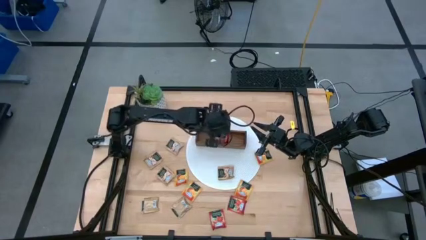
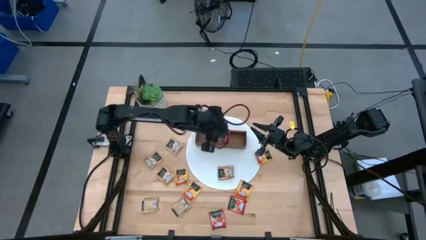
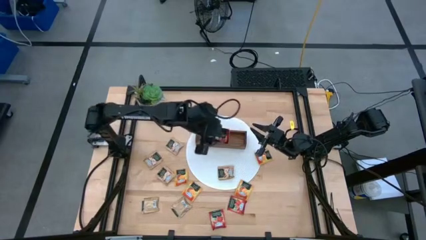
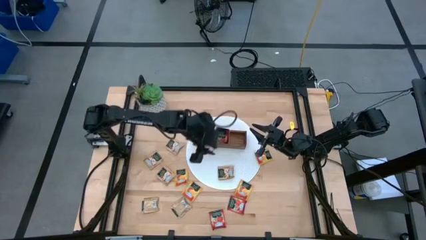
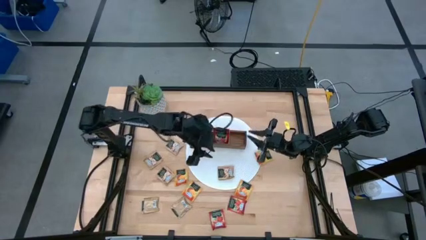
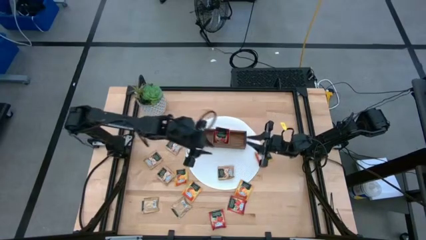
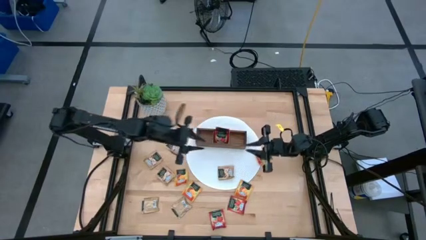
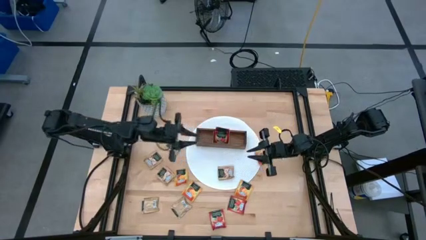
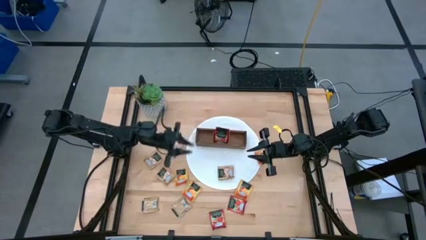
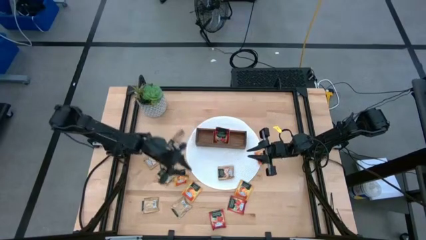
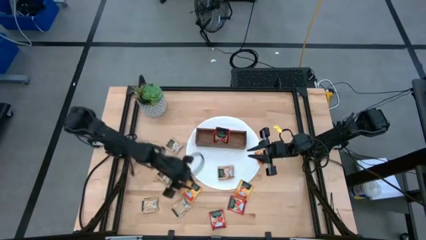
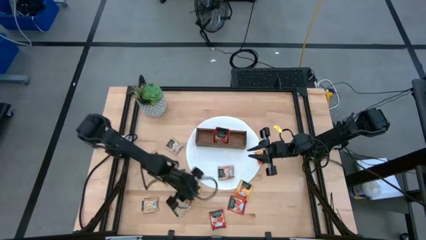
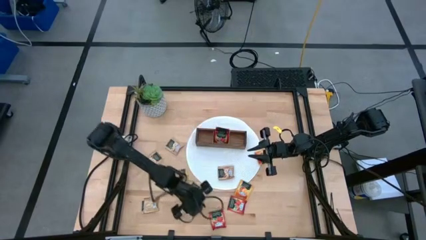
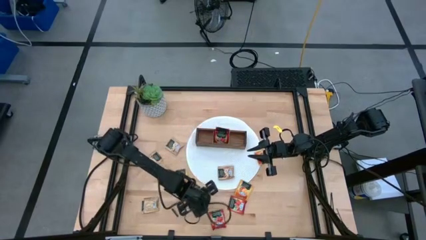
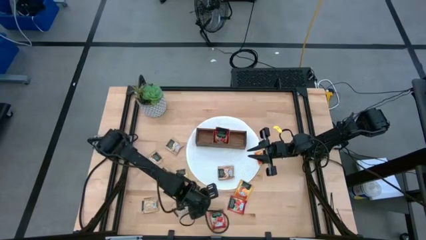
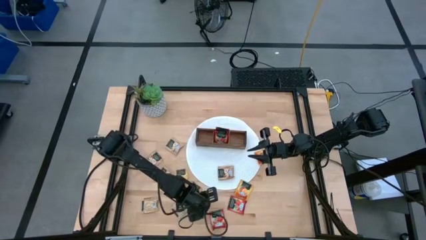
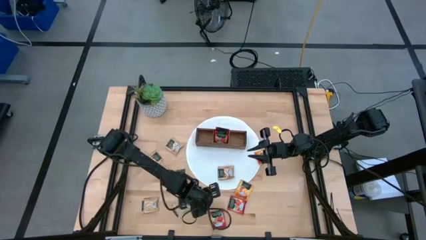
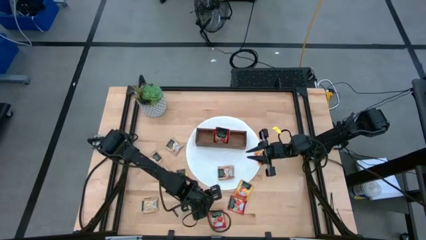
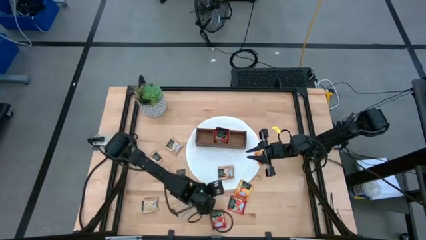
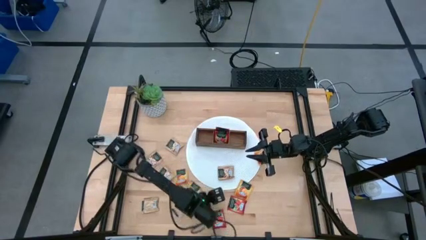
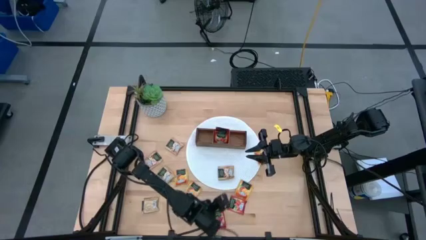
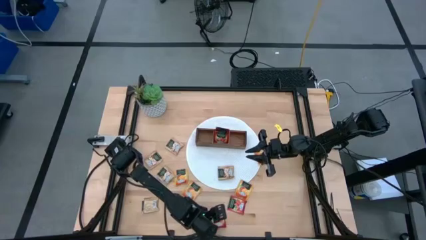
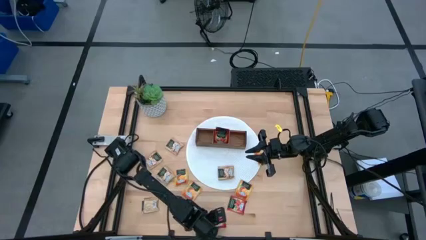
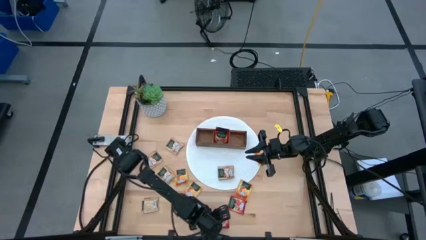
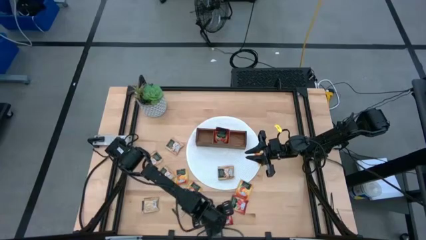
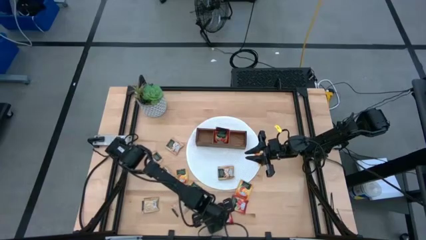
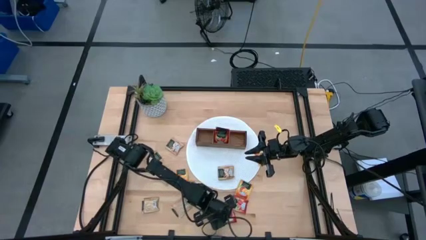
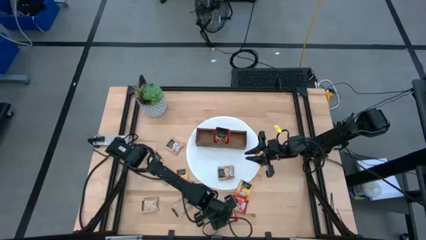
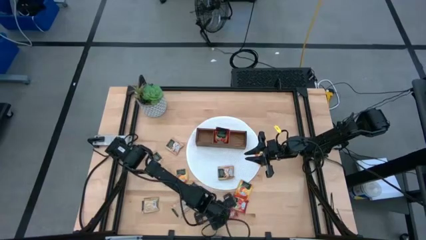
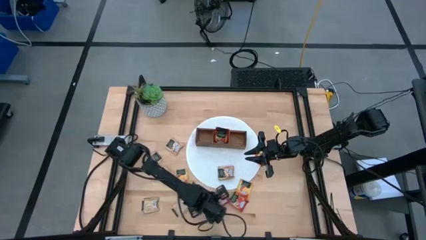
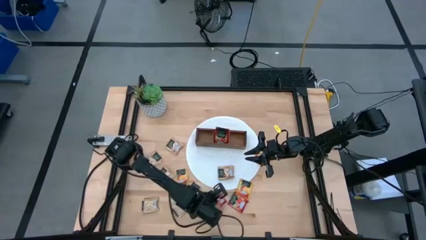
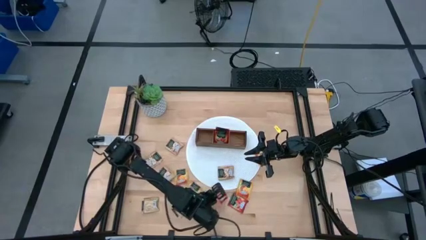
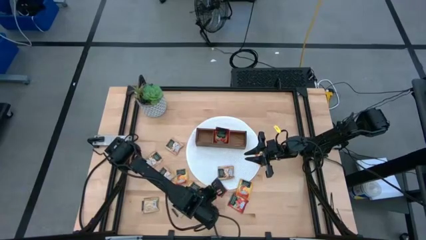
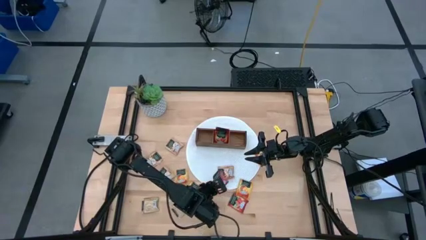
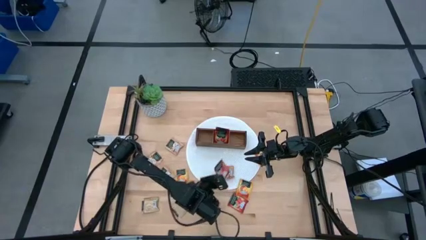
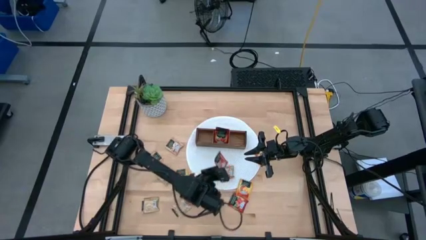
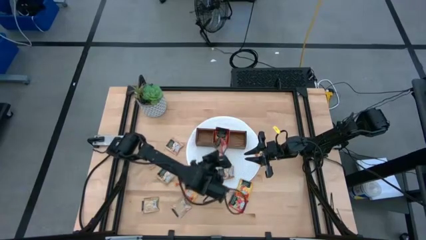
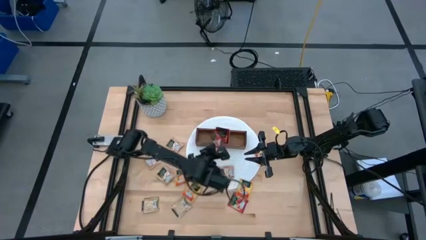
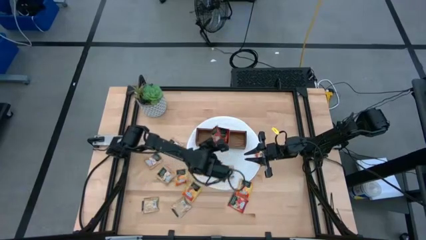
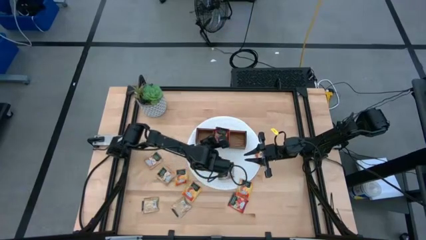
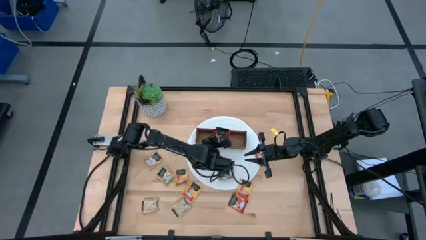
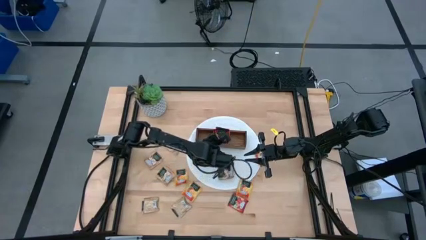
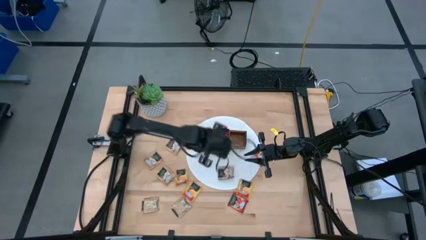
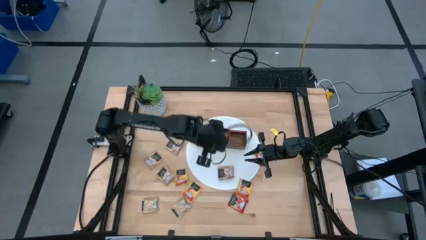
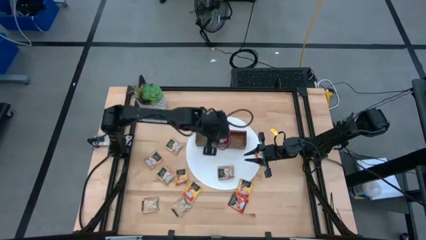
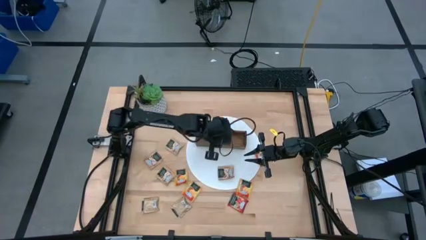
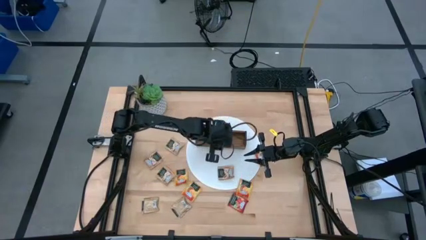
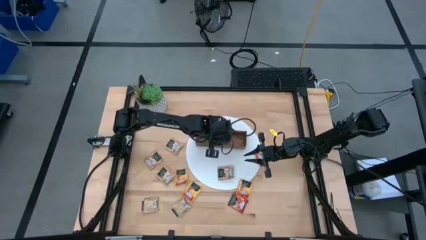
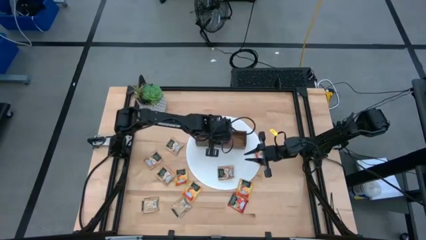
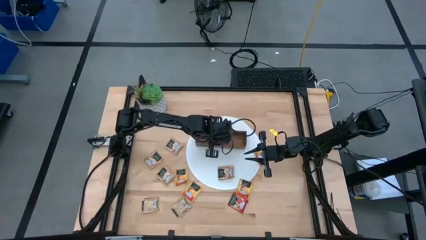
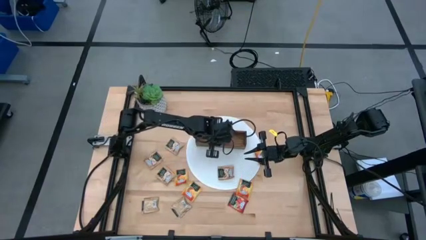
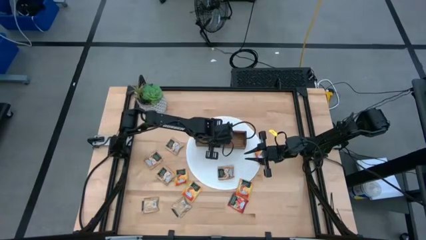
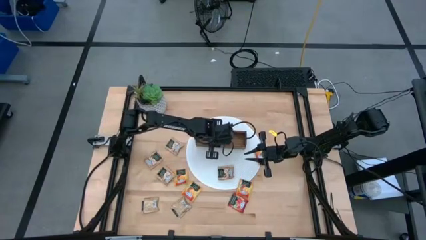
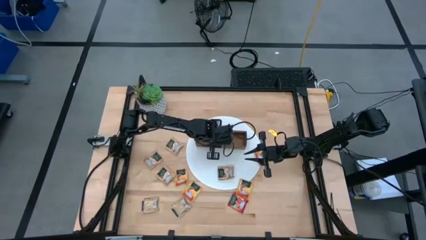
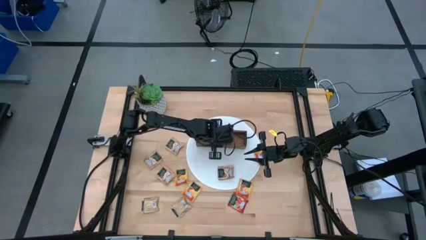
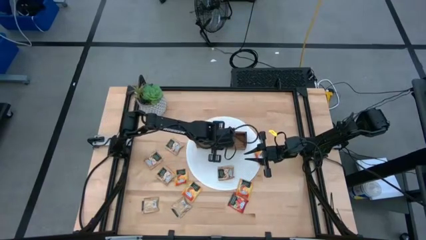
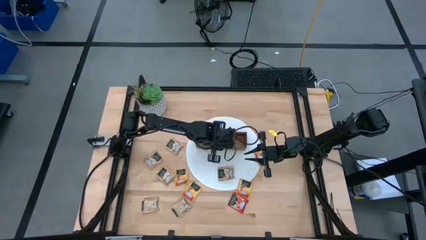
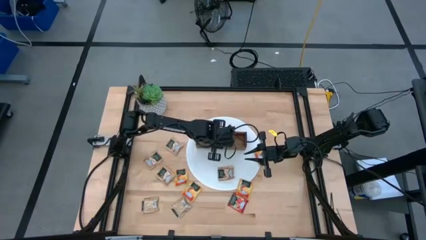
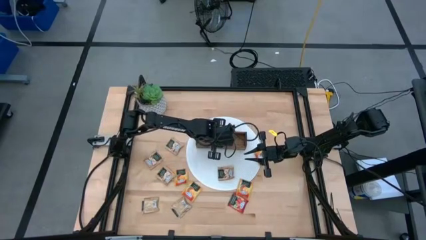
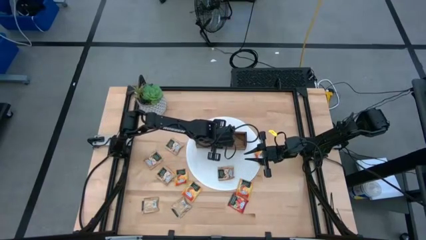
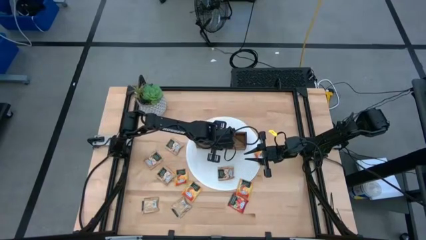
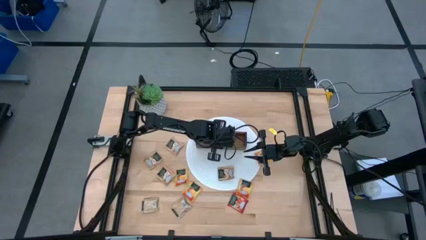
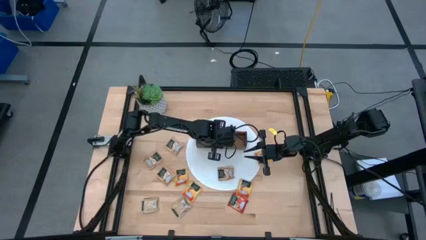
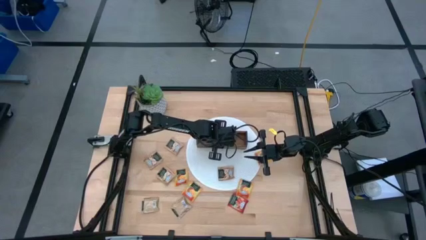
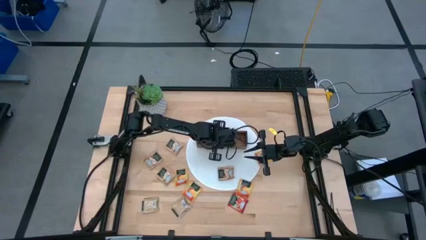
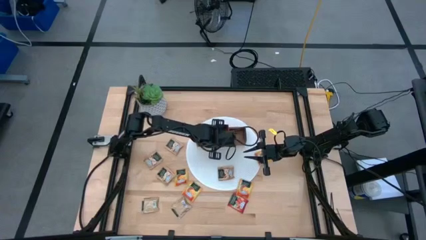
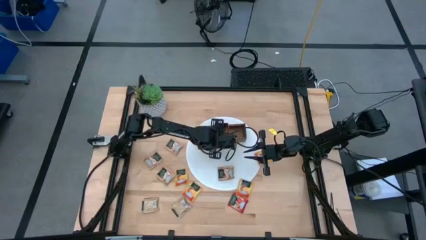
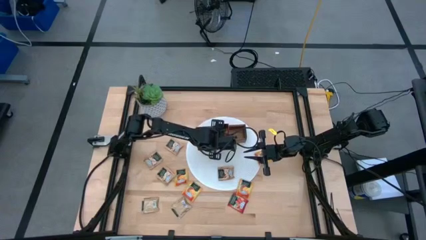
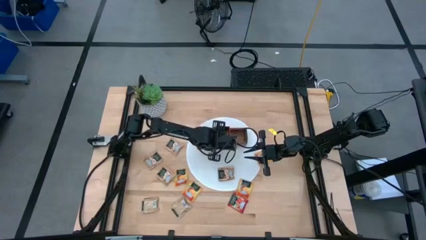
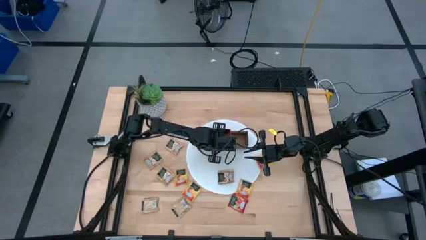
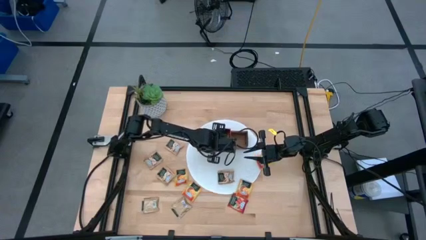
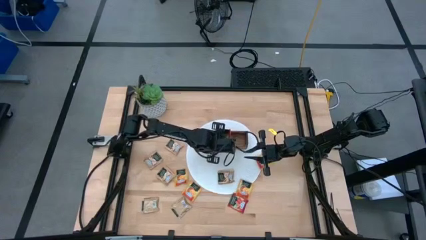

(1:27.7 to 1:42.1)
Task: Pick & Place Tea
Put the red tea bag into the middle section of the wooden organizer

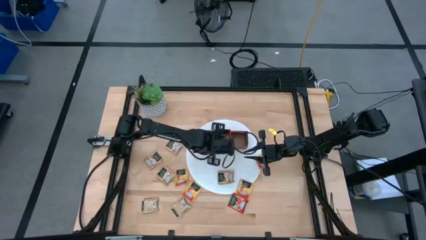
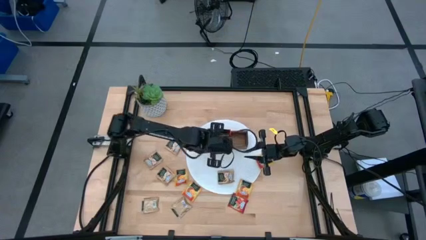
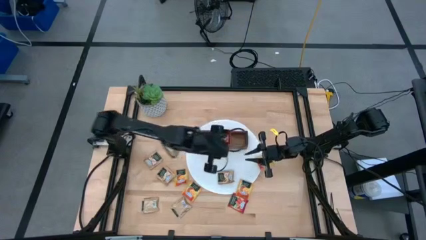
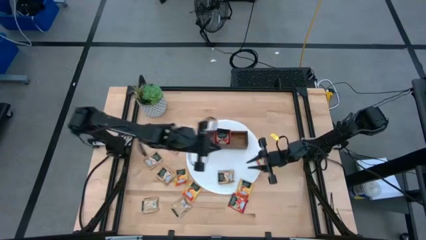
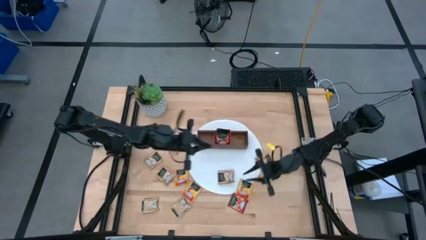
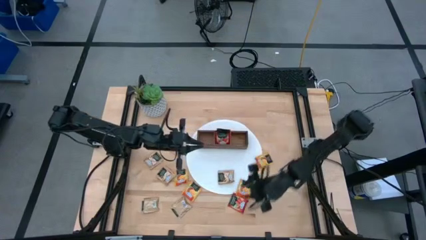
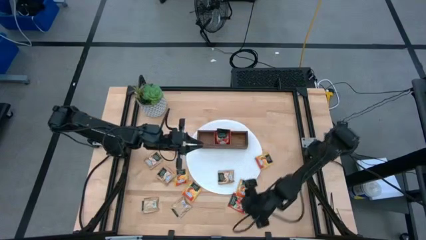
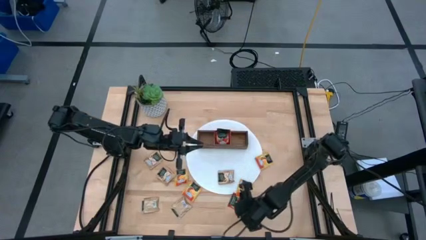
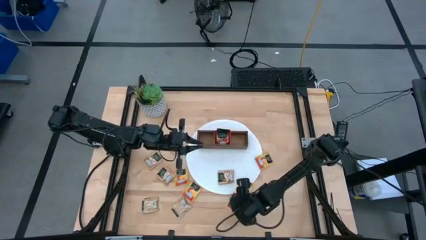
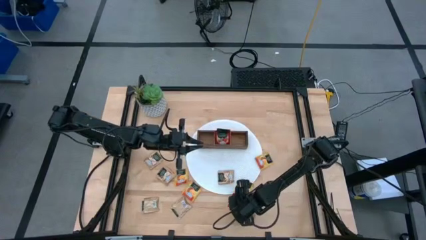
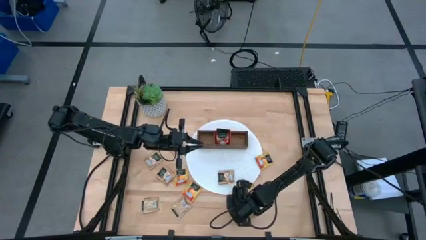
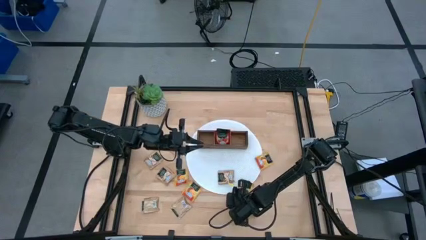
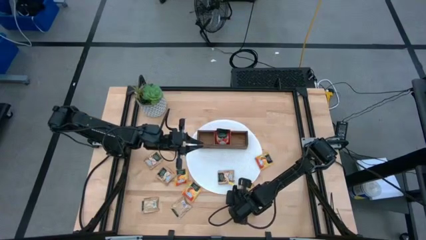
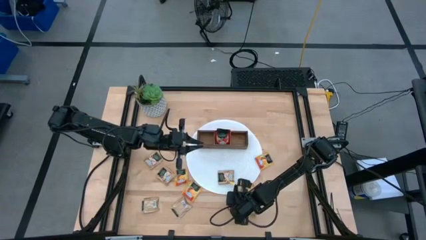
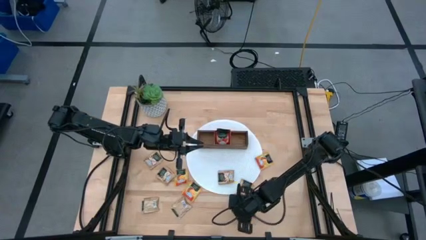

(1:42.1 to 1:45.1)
Put the red tea bag into the middle section of the wooden organizer
